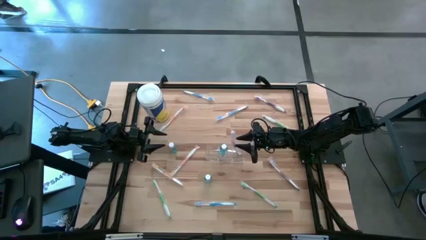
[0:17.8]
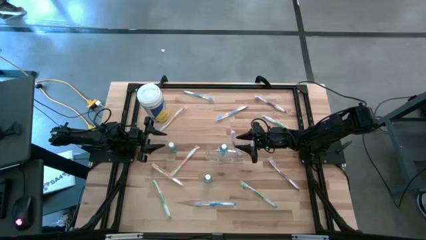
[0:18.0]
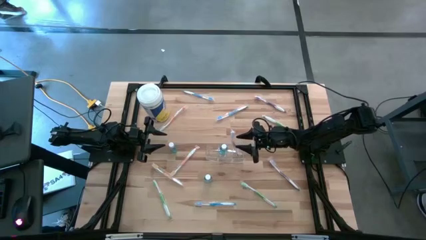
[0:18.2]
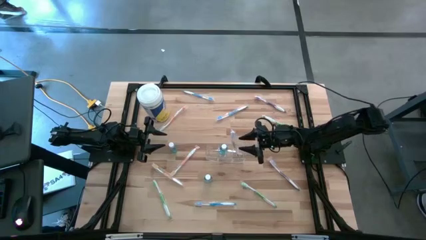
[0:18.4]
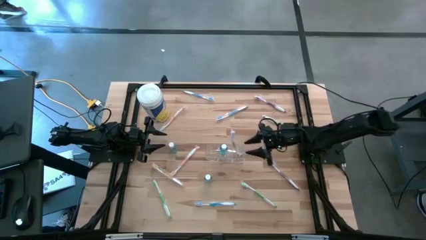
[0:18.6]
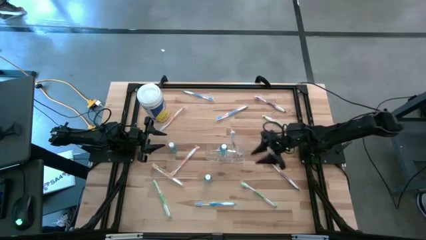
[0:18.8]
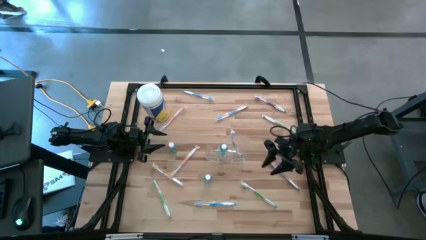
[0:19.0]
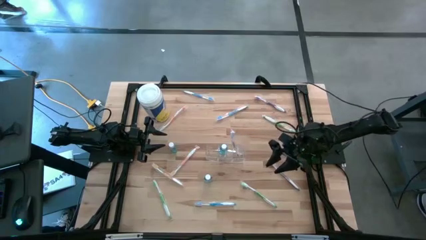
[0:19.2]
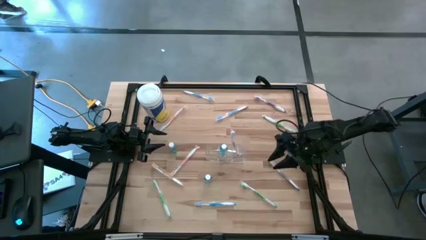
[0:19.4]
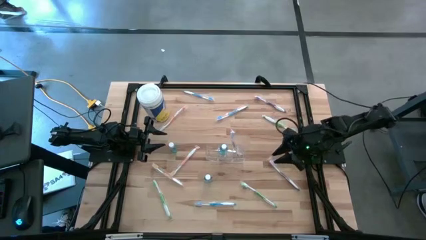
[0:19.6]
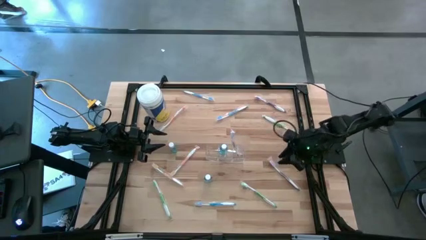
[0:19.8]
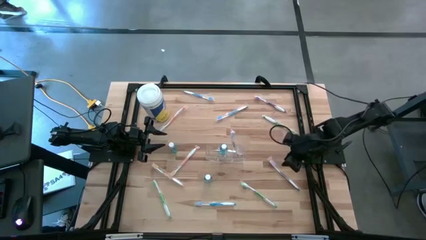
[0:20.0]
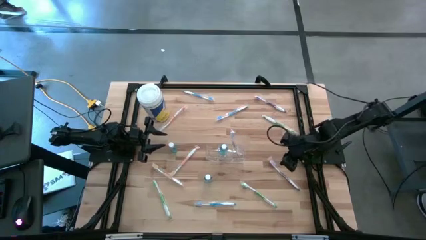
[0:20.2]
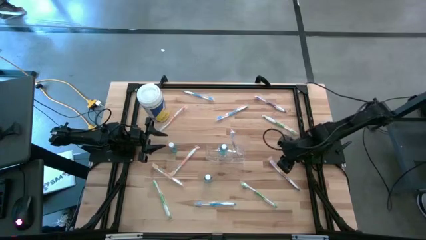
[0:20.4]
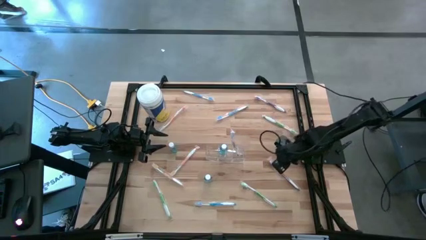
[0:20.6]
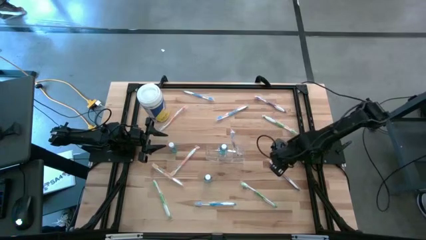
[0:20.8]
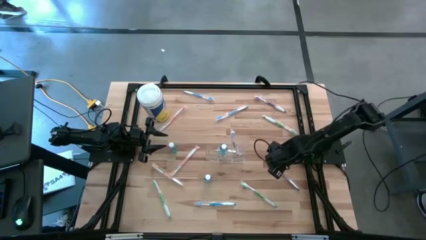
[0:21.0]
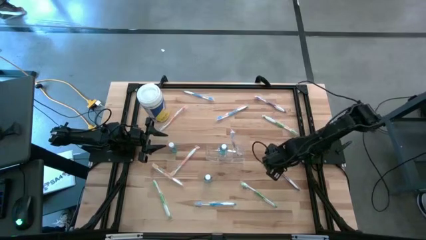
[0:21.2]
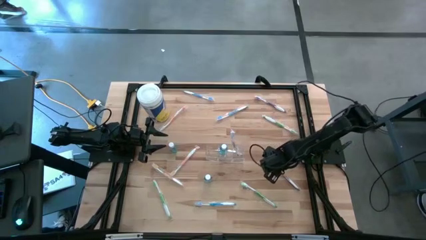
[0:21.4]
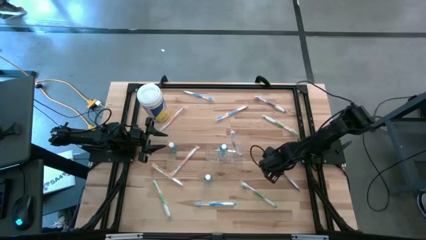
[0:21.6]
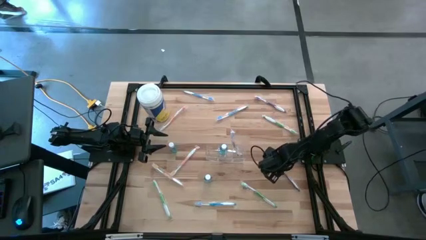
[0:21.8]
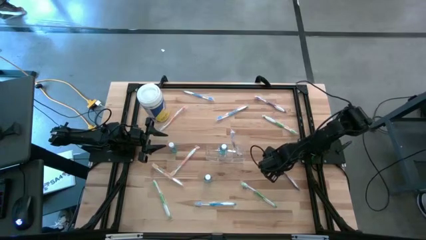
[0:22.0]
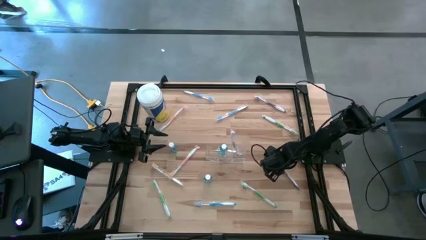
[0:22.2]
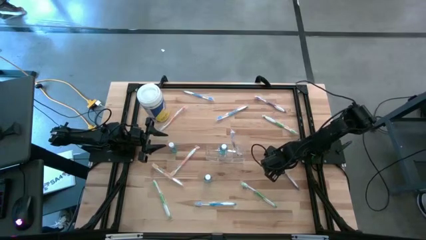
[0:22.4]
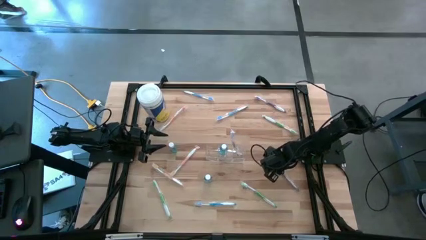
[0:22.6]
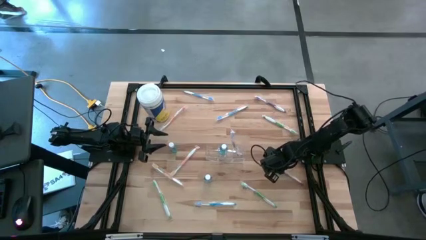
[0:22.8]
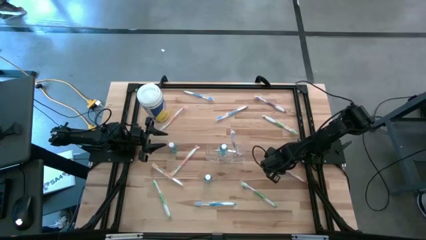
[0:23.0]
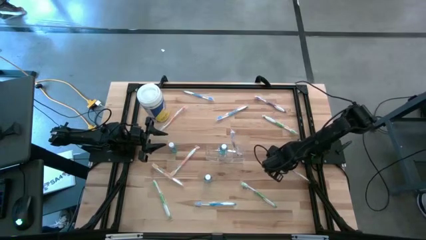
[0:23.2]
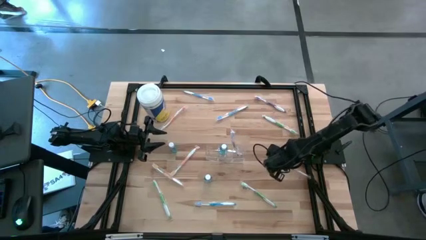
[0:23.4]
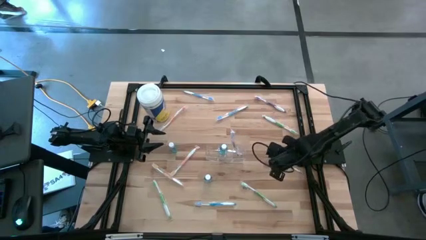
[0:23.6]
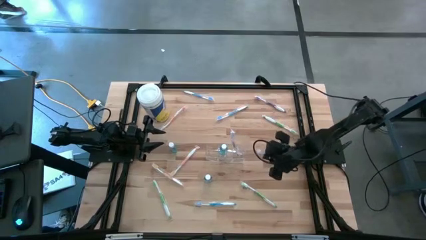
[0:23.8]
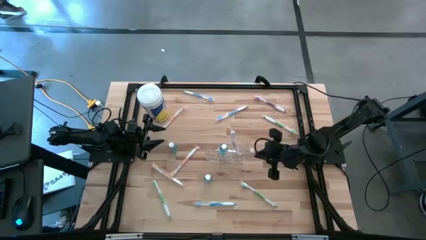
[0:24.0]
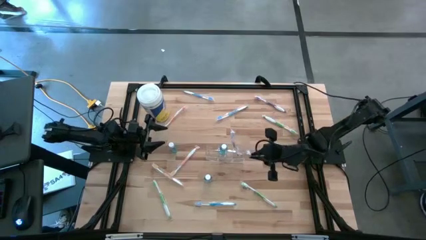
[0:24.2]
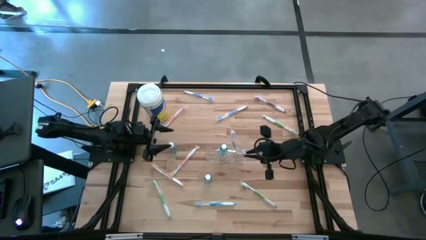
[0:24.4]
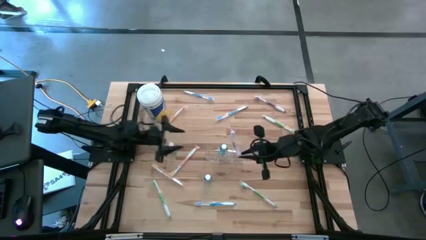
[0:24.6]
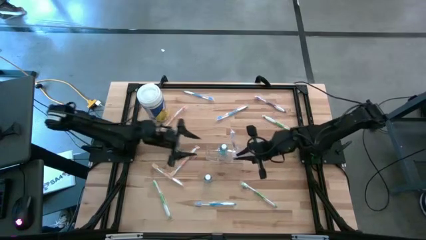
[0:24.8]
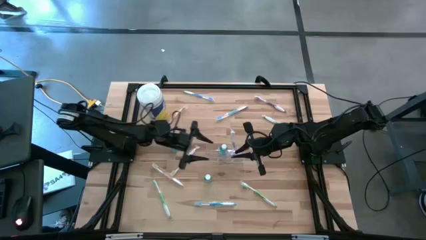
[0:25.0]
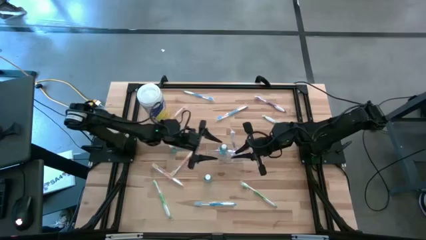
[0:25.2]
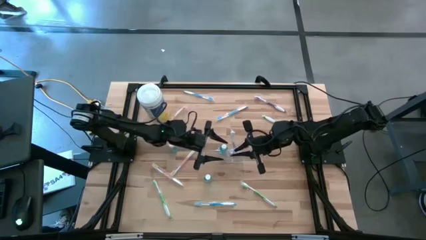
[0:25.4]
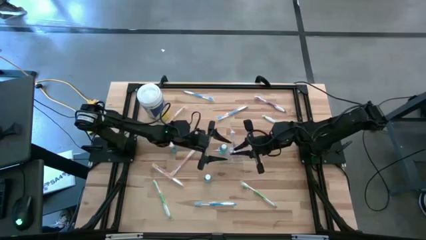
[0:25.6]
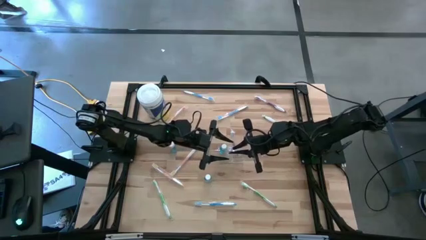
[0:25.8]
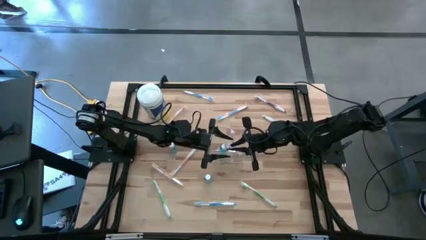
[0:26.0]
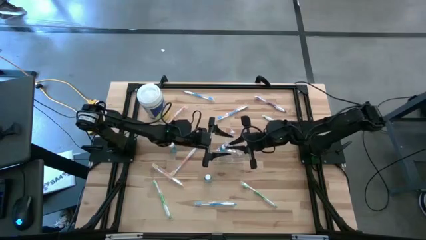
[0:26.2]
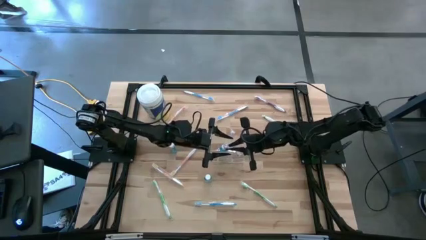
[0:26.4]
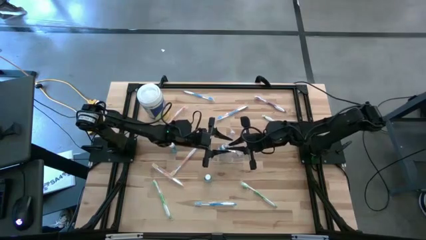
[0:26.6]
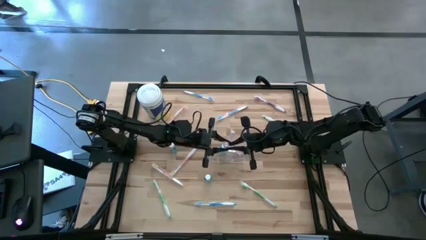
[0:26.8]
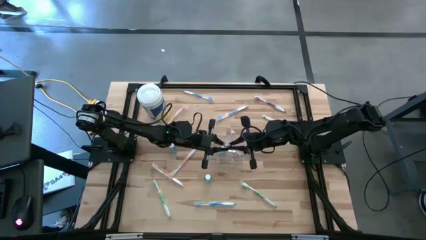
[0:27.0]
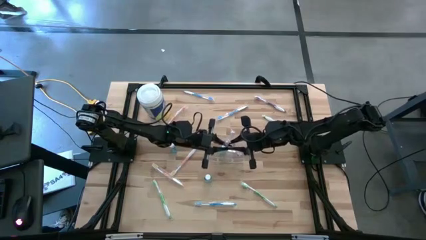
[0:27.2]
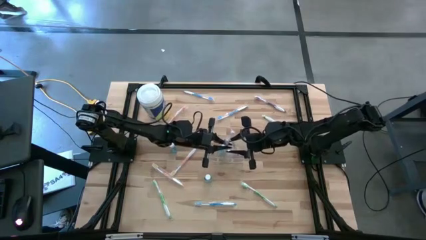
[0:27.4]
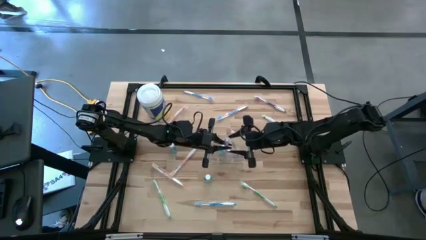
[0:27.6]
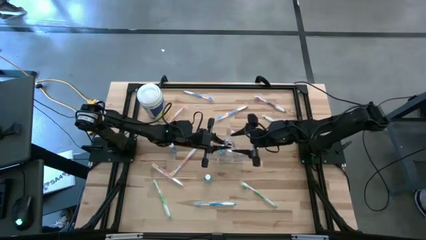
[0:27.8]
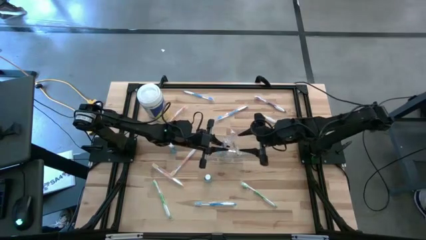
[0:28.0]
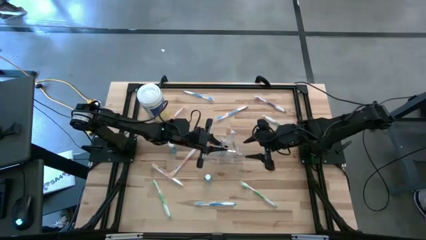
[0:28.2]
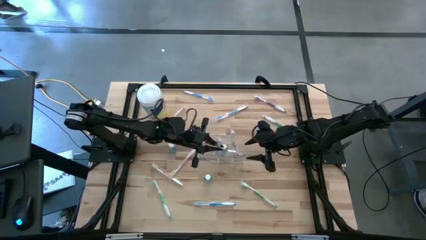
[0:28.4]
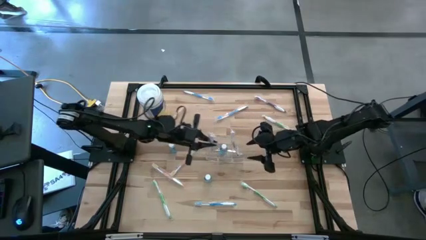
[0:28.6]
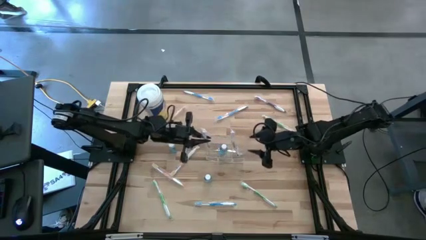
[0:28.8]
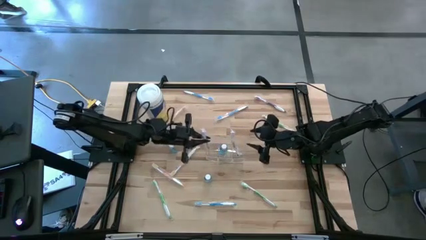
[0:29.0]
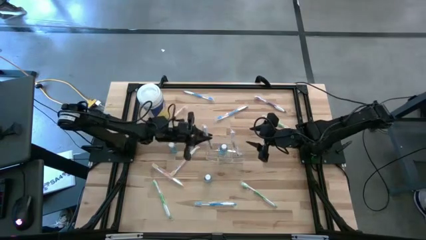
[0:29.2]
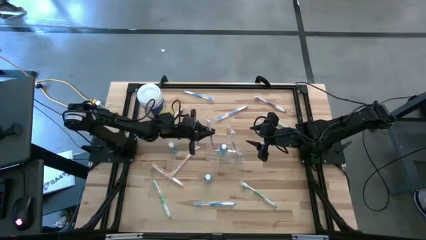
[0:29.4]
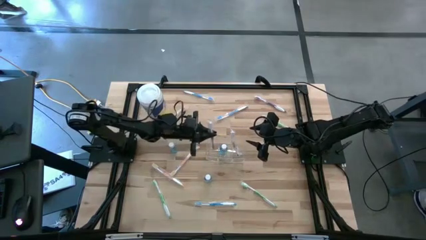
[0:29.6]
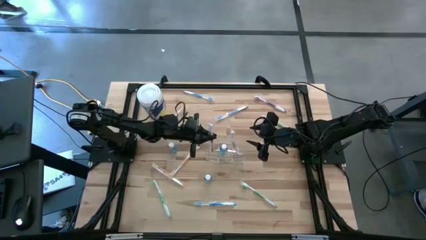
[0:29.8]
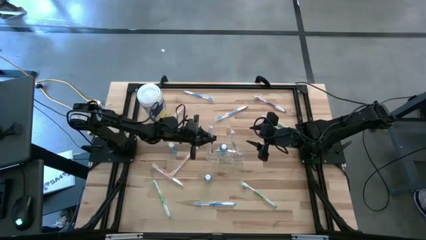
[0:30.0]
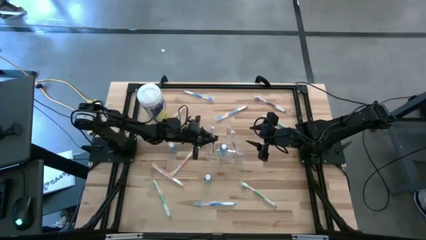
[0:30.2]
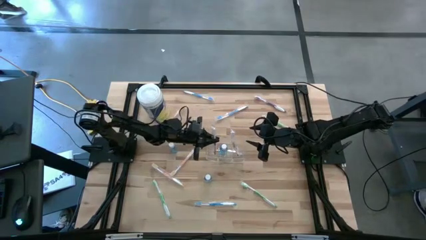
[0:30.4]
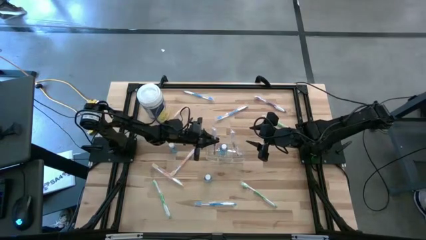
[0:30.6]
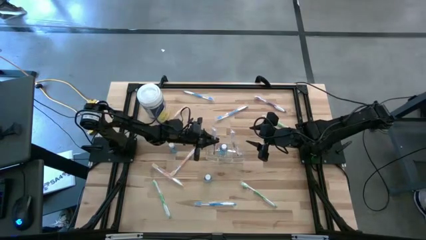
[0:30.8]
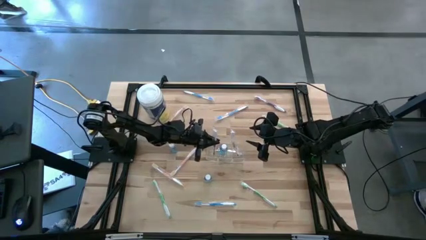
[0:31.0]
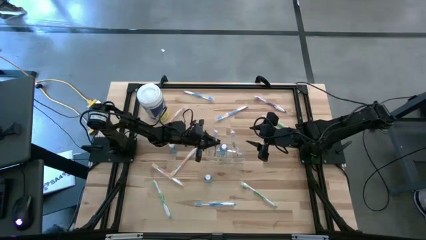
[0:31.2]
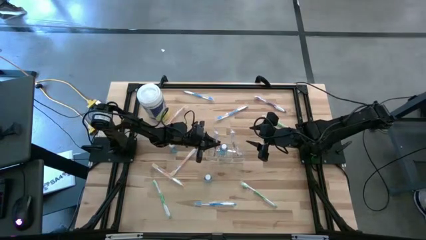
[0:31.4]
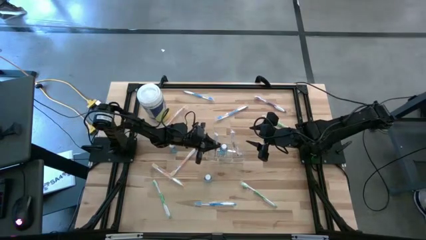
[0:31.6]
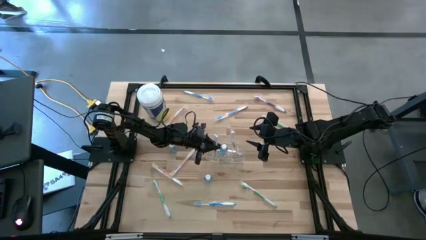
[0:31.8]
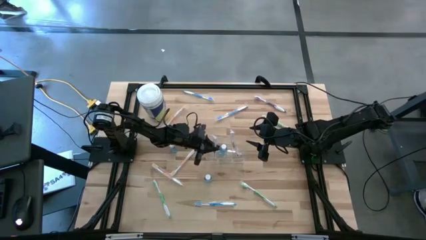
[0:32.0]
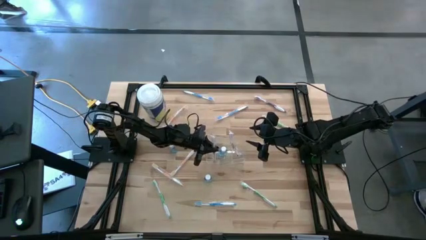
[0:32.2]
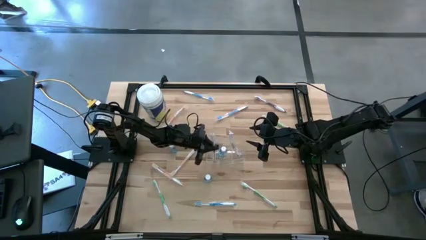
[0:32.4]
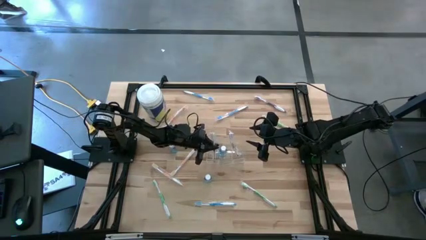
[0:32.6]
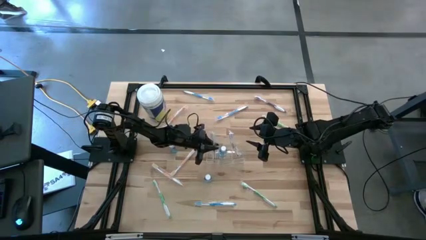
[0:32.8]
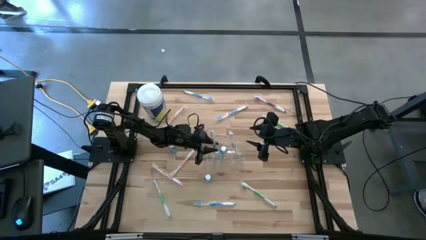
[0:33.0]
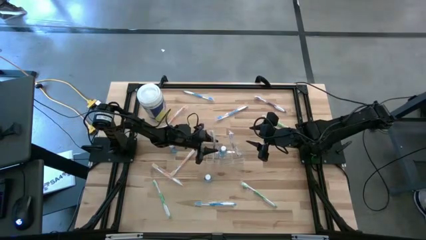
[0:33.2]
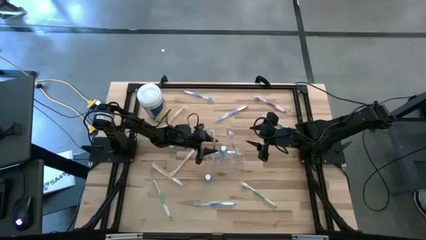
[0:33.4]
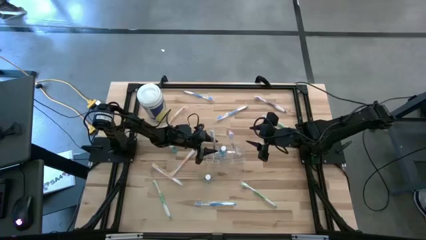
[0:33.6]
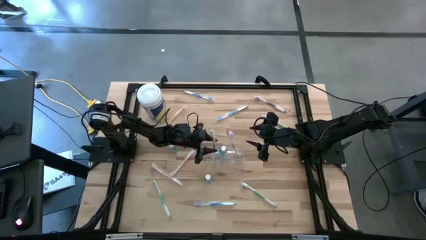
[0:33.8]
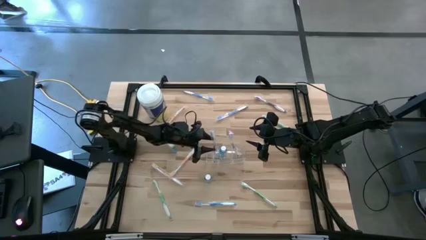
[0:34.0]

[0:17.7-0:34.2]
Task: Pick & Place toothbrushing station
Put the bottom purple toothbrush into the transparent organizer
